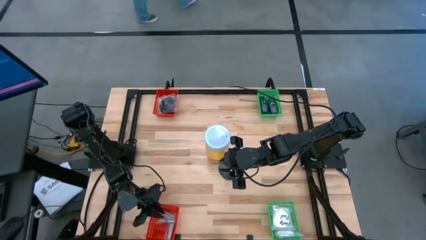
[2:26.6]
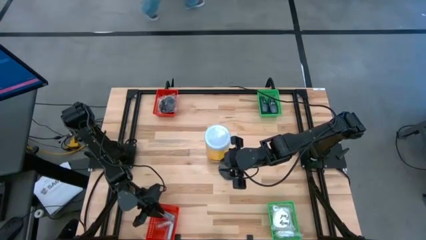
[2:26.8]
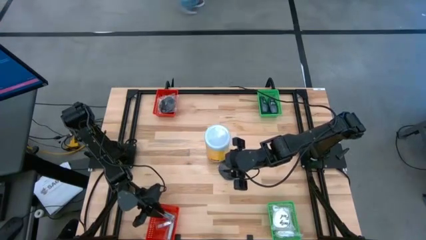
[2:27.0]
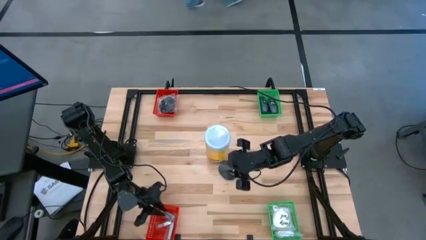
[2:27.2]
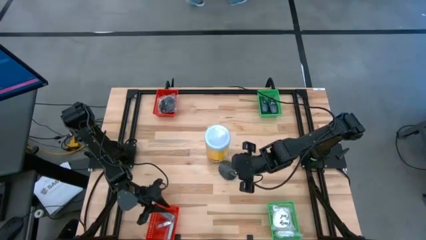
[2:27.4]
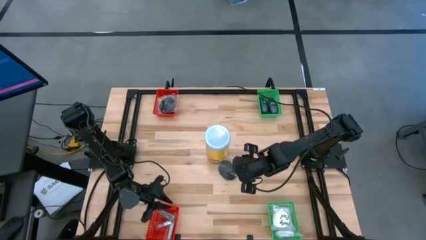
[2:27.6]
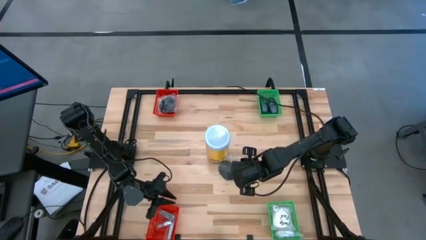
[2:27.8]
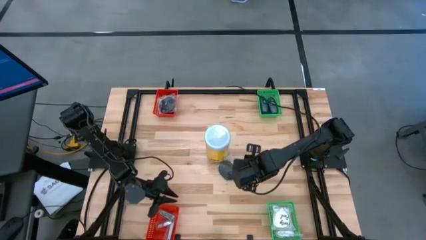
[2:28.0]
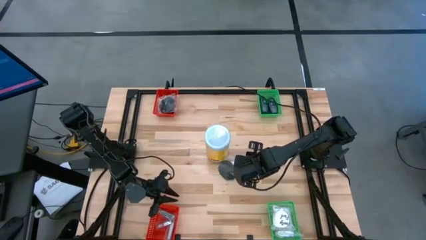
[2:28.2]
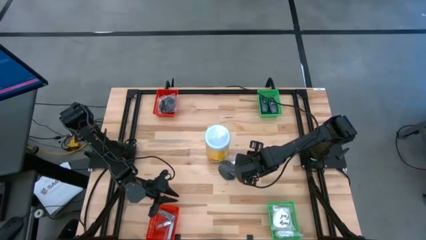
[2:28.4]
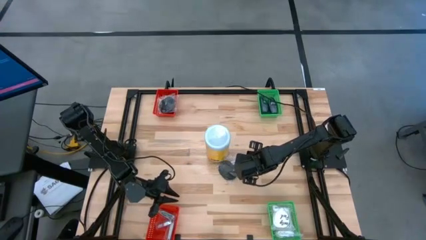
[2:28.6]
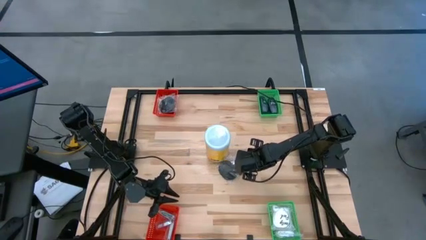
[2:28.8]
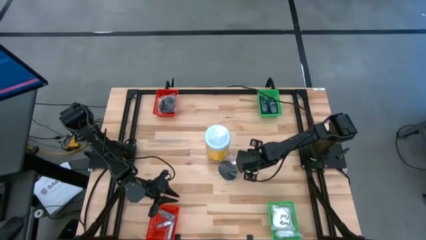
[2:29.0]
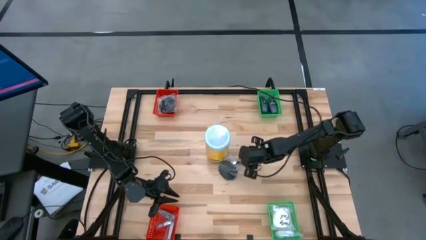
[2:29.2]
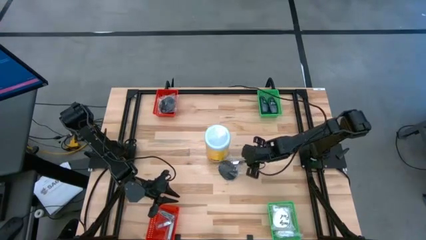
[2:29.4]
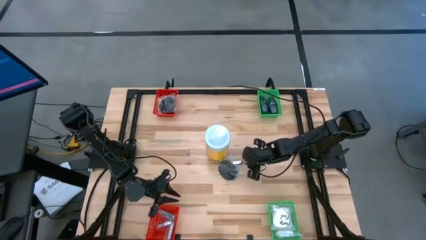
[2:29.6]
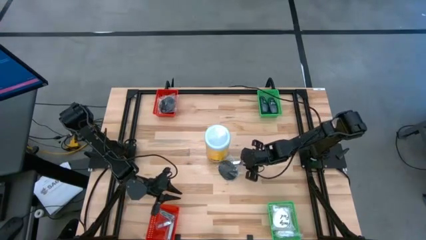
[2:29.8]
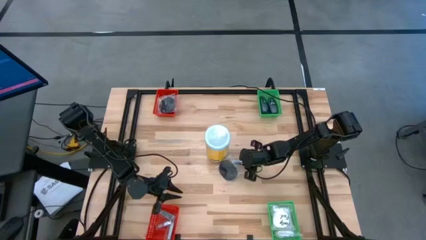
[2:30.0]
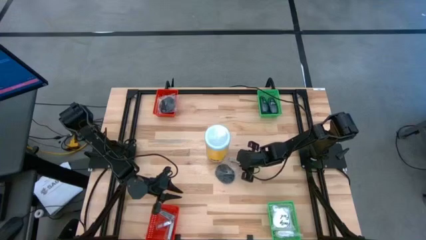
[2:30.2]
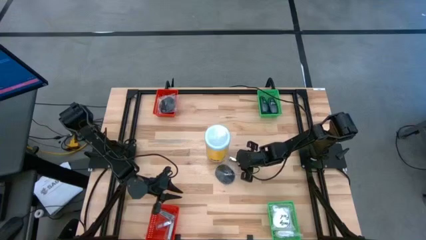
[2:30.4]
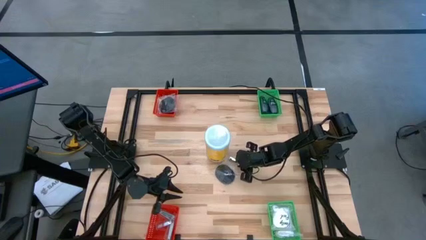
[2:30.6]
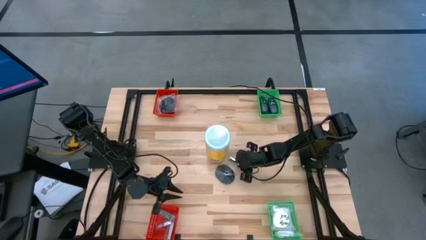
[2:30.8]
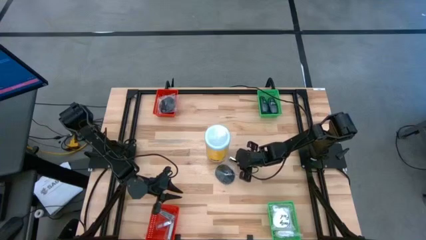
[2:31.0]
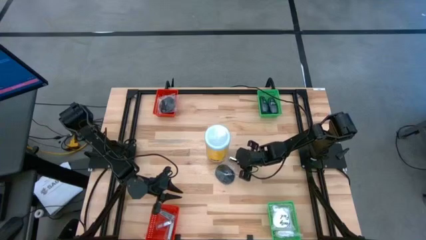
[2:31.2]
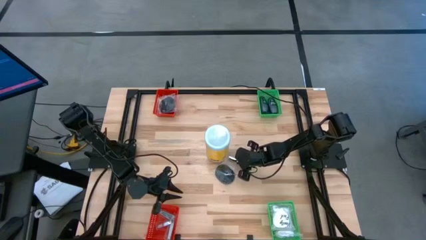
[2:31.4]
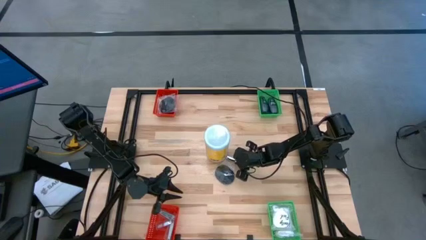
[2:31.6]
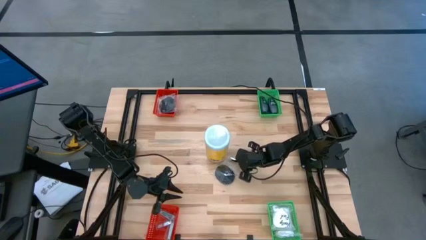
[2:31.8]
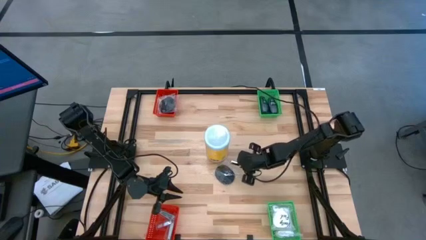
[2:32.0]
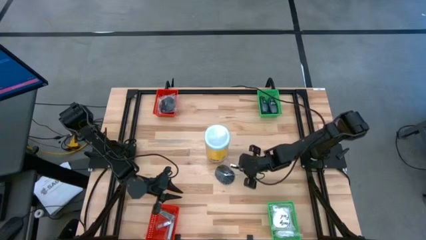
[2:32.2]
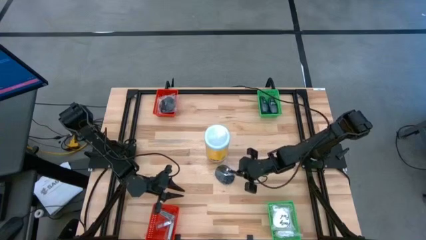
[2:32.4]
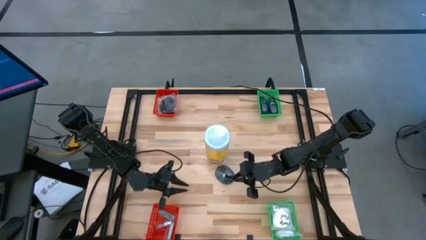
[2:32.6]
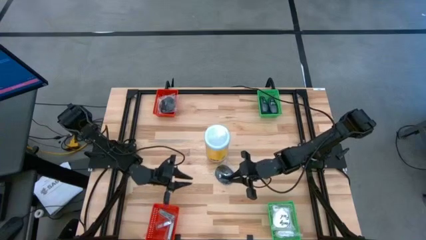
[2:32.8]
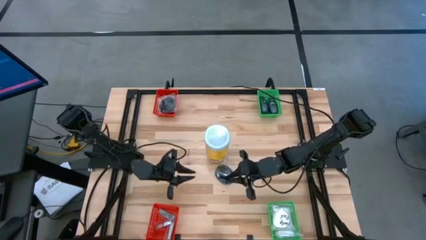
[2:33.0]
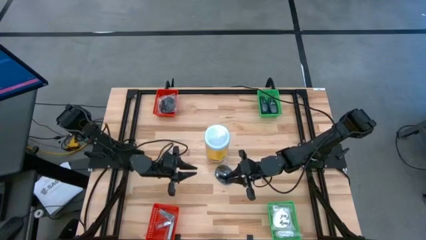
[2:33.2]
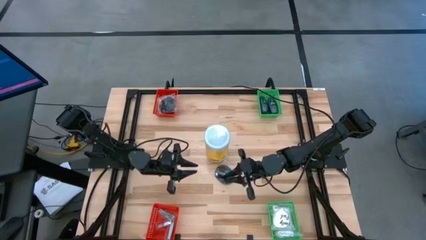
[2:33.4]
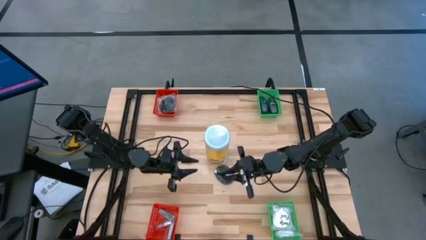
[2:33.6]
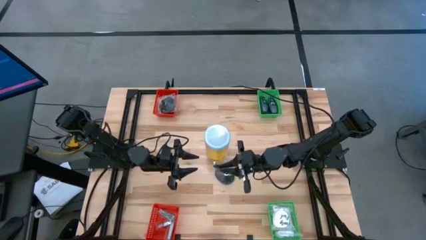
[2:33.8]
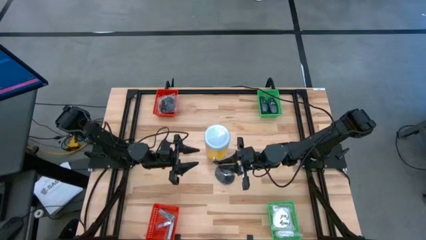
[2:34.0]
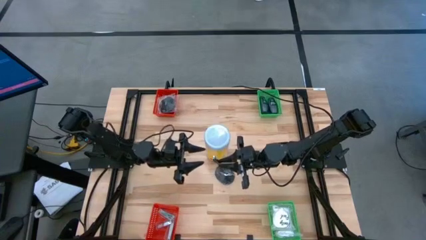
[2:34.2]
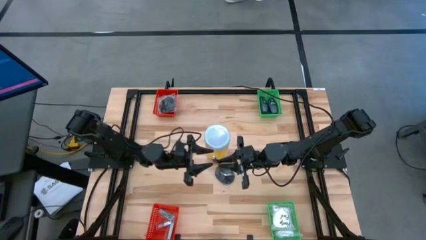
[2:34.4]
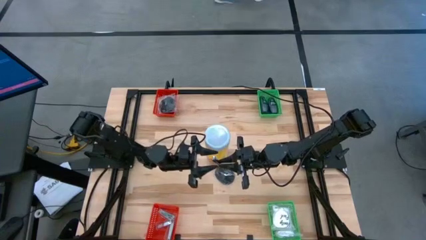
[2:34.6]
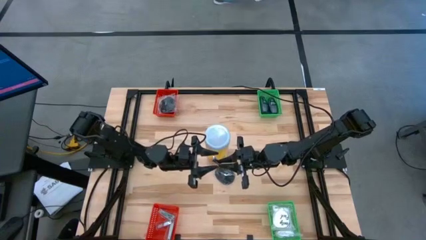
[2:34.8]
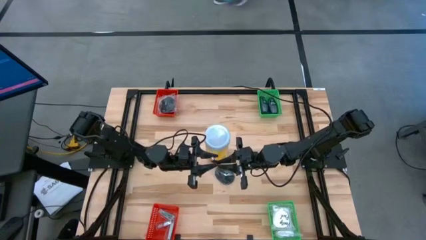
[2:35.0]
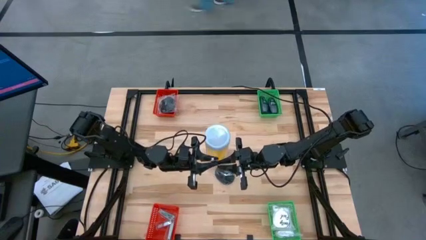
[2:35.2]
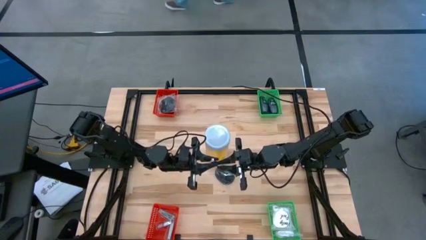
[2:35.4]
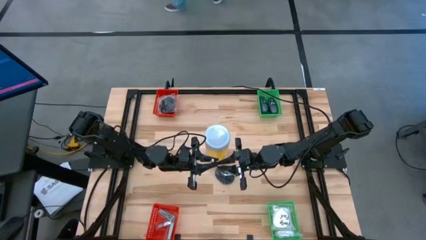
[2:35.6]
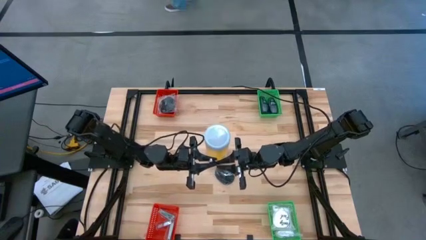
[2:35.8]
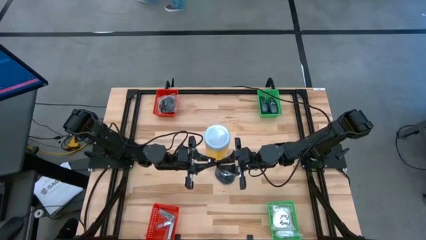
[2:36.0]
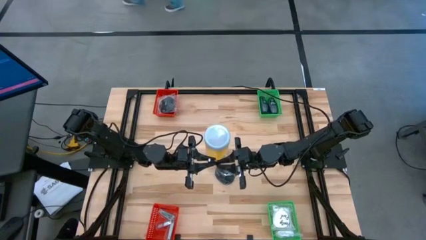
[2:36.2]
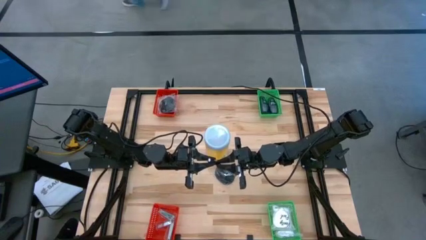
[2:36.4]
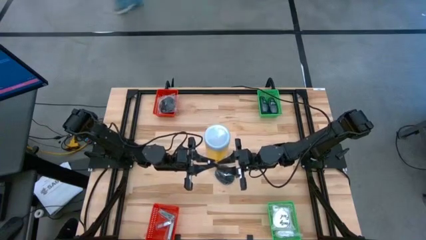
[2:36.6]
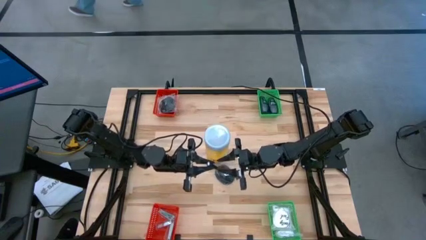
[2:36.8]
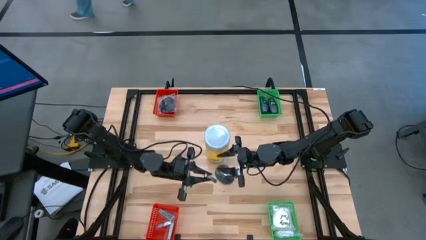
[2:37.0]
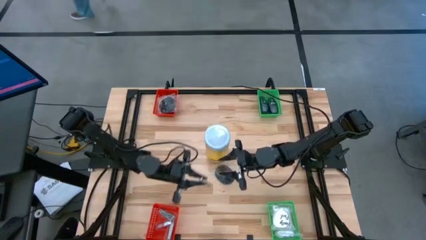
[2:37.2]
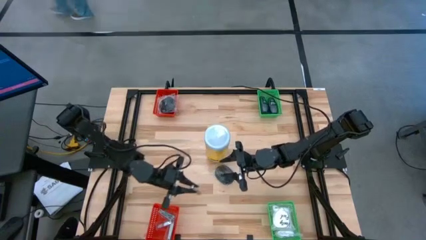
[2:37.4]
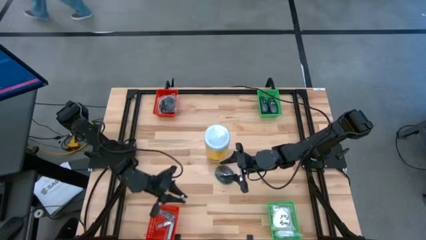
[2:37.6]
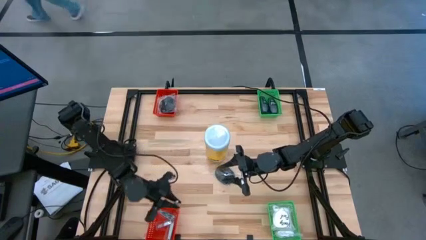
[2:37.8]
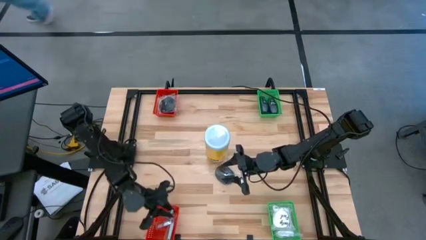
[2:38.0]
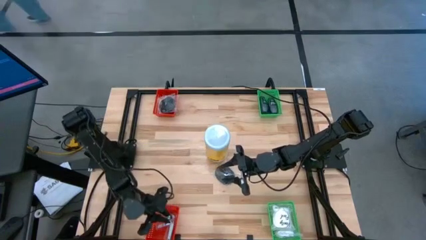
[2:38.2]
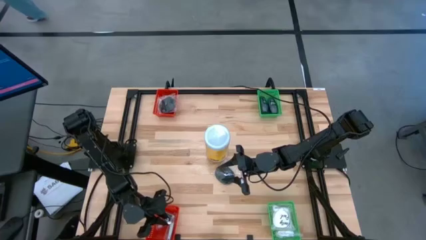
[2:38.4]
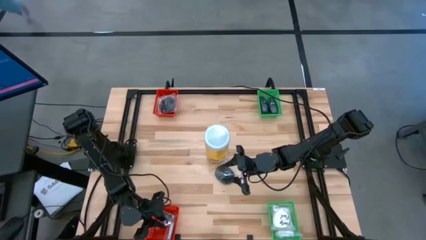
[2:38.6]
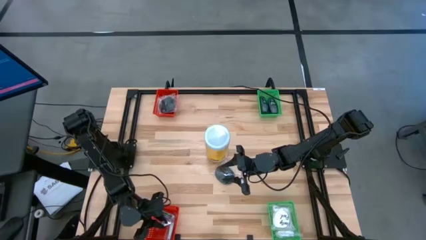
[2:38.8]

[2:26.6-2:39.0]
Task: Pick & Place Travel size toiletries
Put the nail cutter into the bottom orange bin

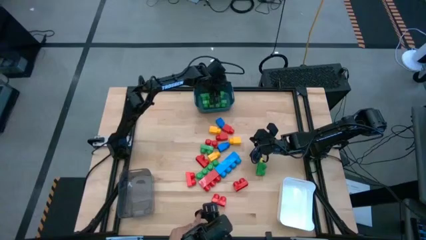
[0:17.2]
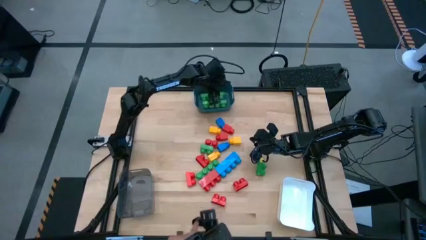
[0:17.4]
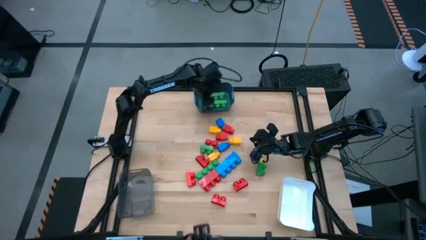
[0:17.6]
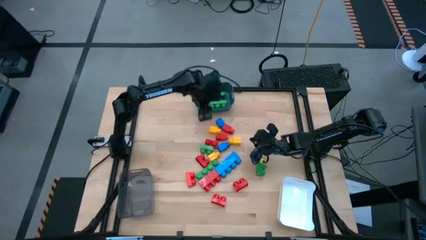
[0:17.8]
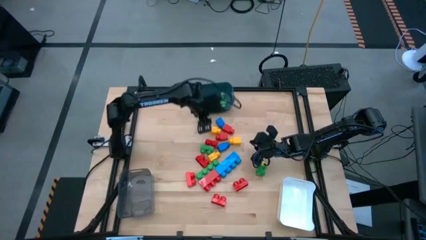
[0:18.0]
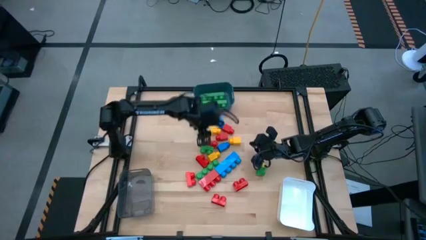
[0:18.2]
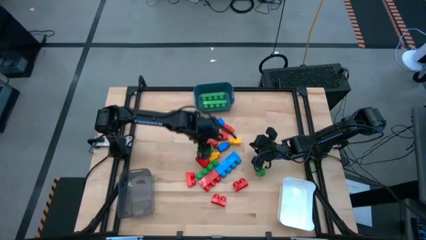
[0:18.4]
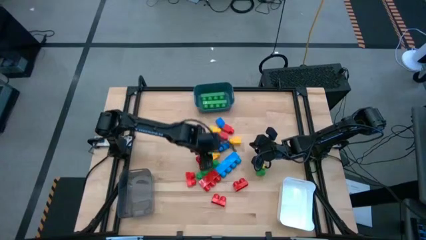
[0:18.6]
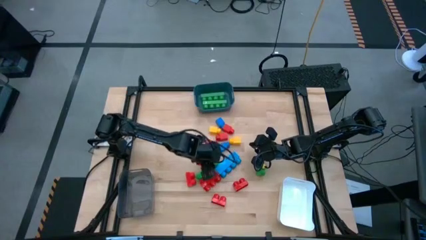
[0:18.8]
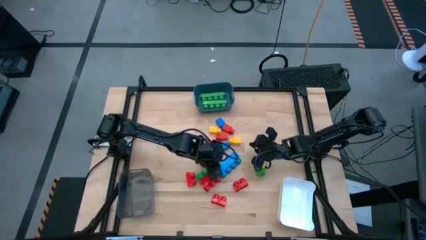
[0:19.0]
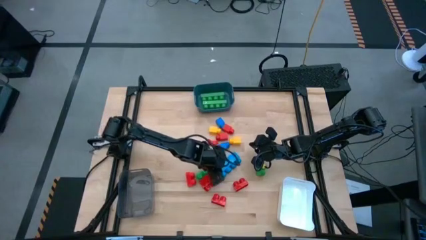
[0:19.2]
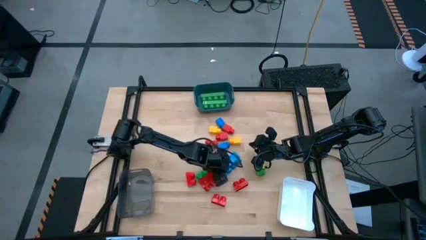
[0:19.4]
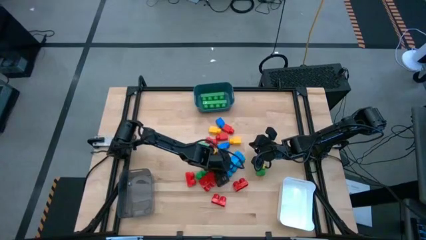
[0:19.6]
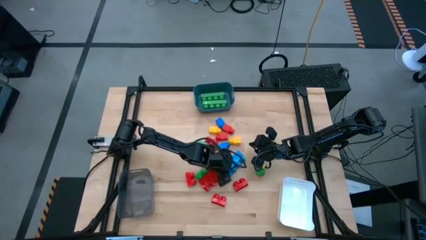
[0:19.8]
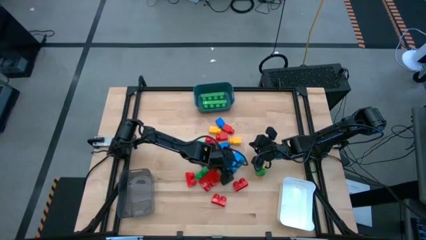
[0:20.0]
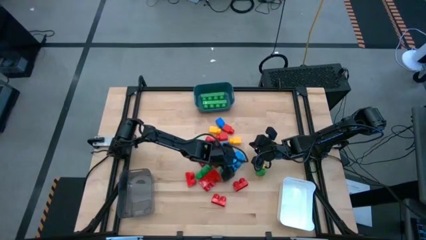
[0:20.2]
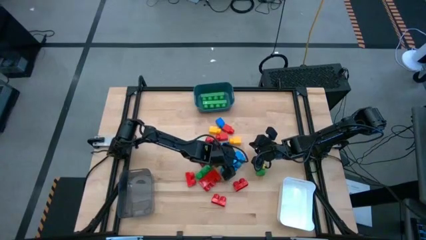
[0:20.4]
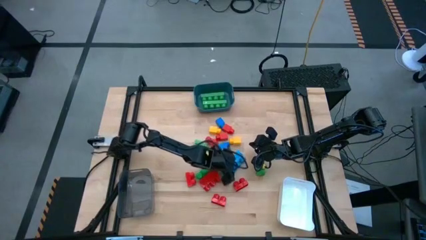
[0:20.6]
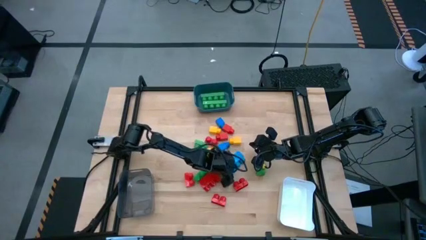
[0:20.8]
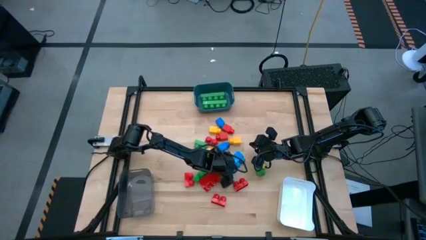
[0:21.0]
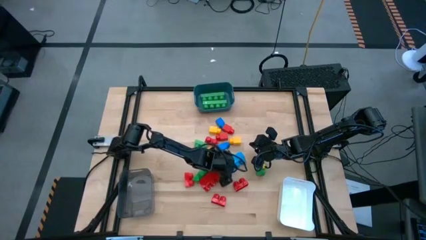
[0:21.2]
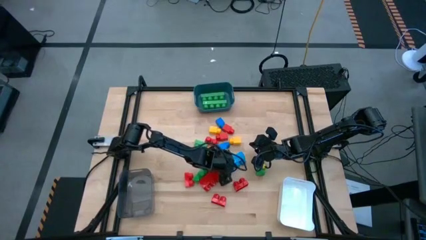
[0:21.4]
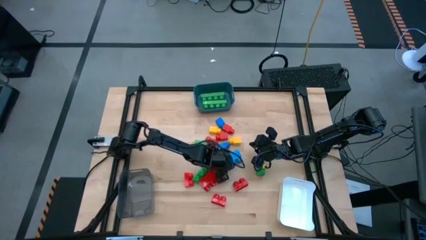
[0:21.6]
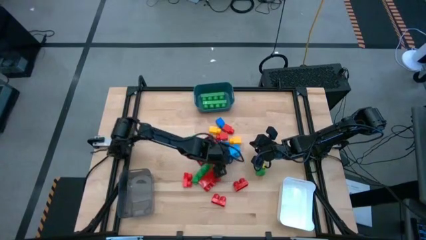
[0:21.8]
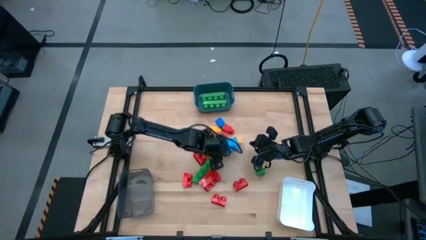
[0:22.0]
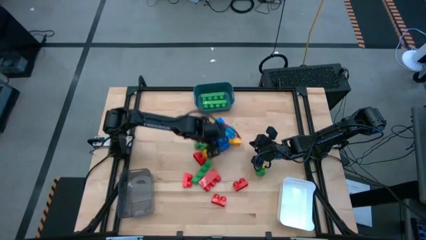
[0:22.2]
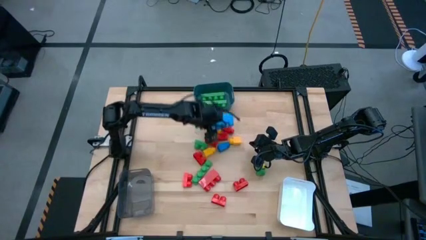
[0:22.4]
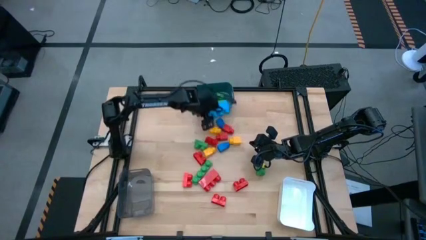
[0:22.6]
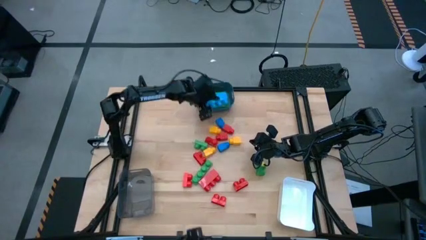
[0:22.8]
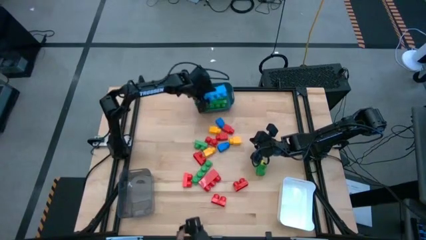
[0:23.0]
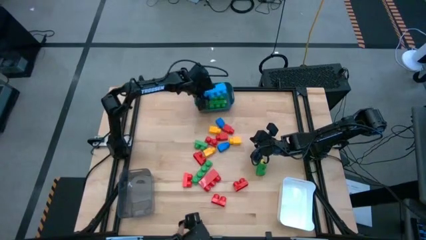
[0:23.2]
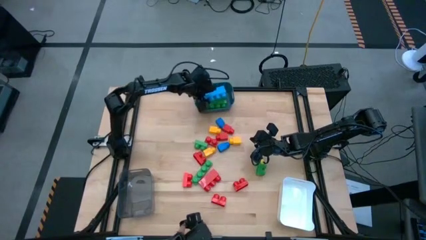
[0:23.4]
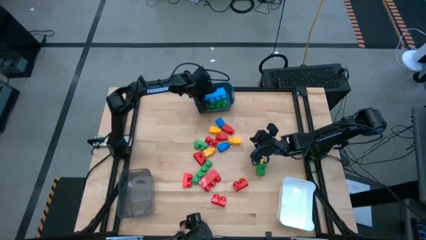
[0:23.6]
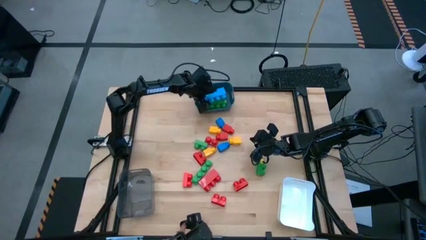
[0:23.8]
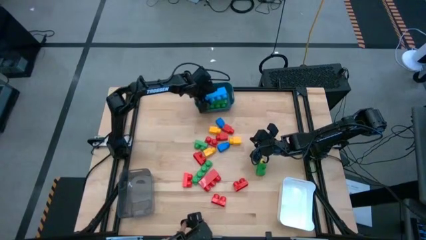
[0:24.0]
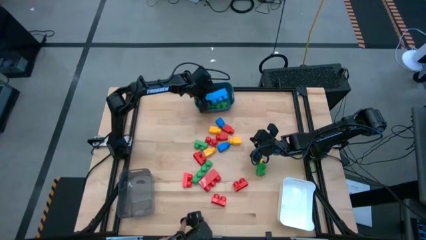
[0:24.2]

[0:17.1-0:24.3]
Task: Sort blocks by size
Put the blue game piece into the blue container
